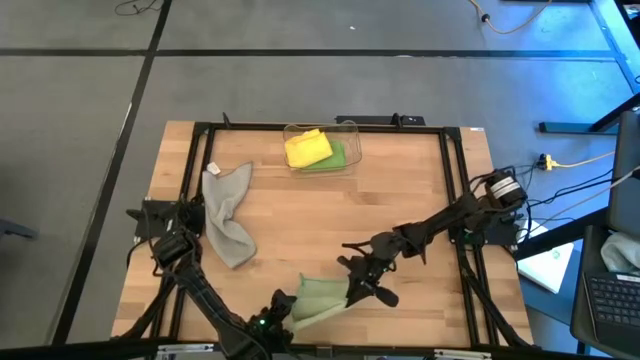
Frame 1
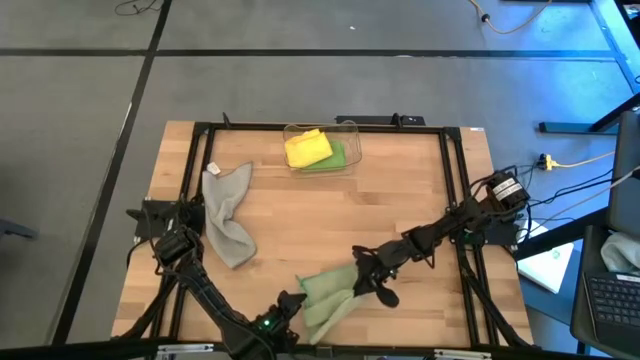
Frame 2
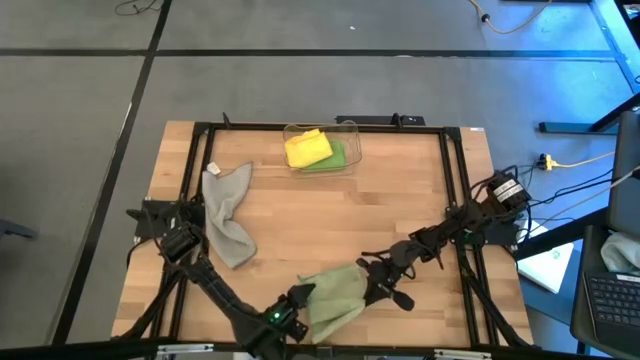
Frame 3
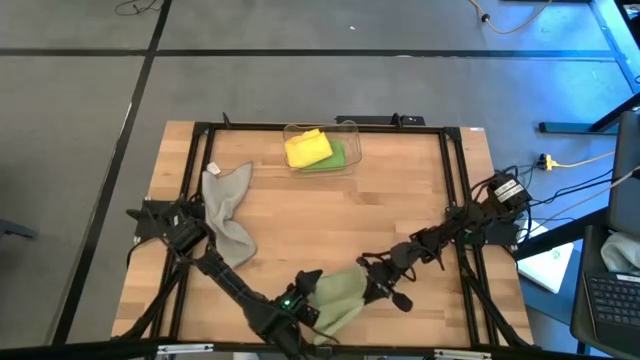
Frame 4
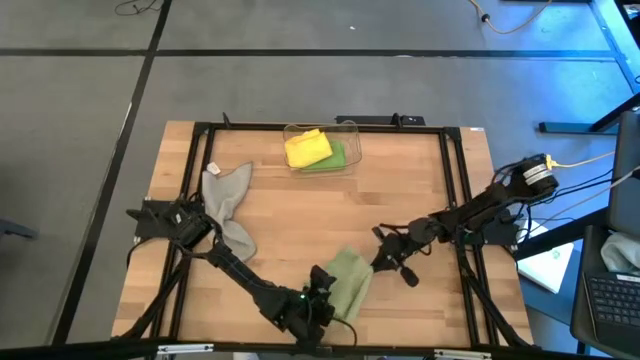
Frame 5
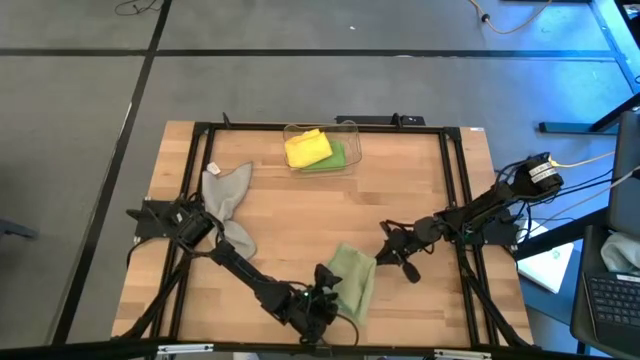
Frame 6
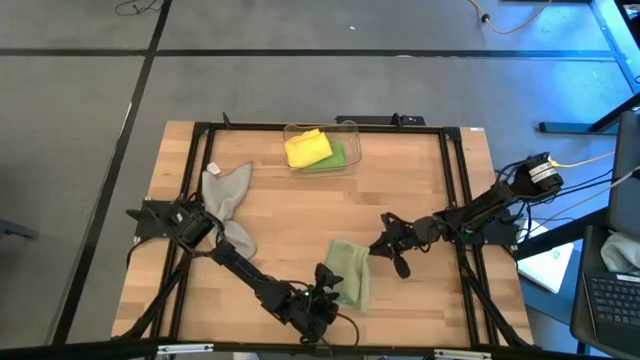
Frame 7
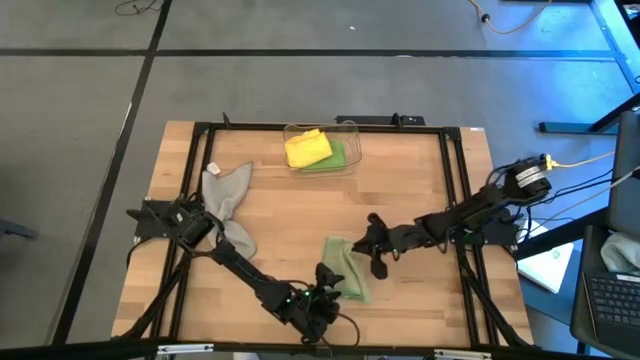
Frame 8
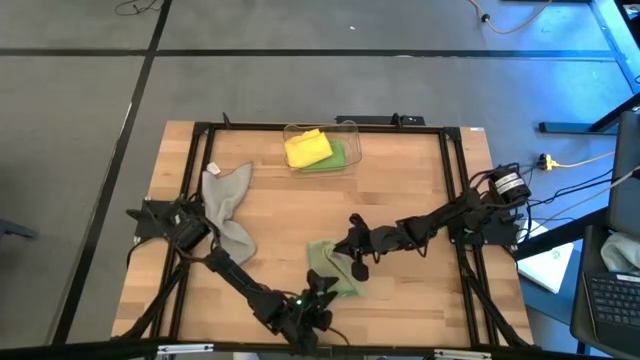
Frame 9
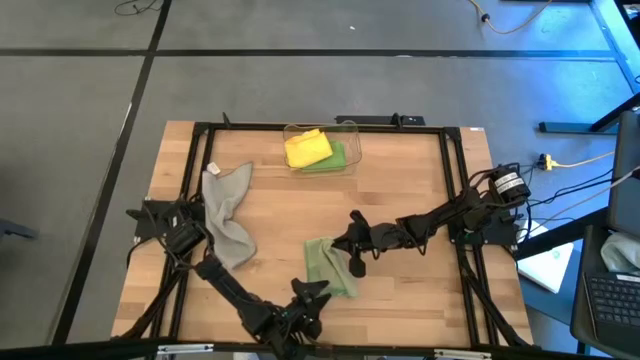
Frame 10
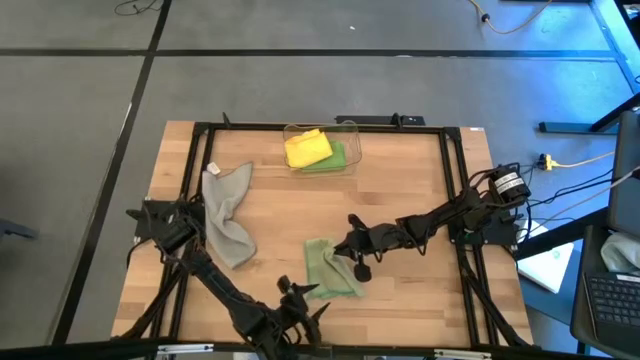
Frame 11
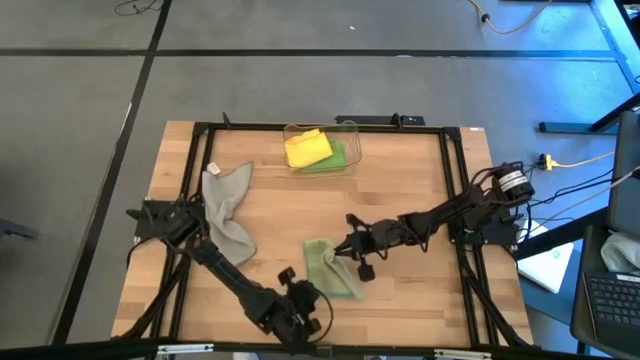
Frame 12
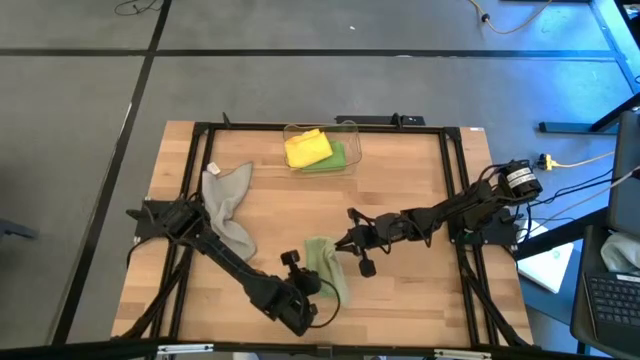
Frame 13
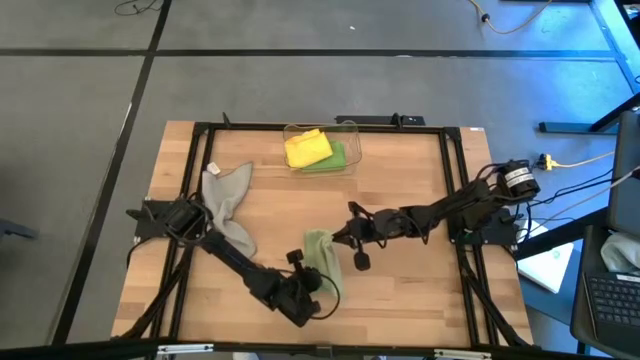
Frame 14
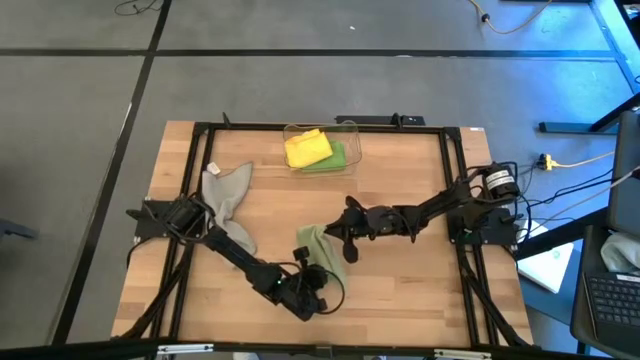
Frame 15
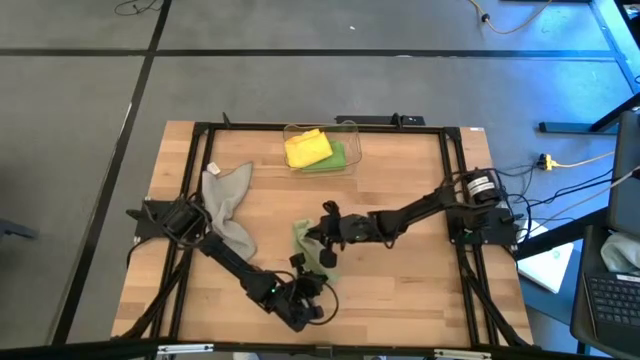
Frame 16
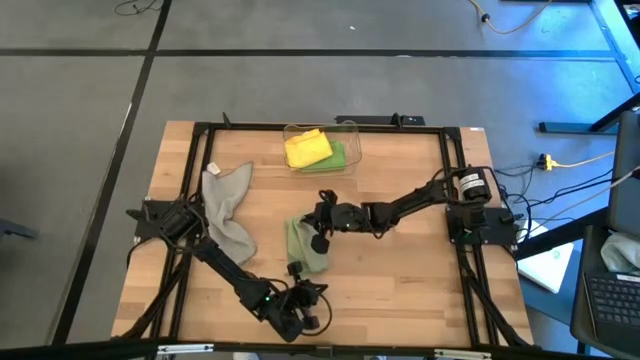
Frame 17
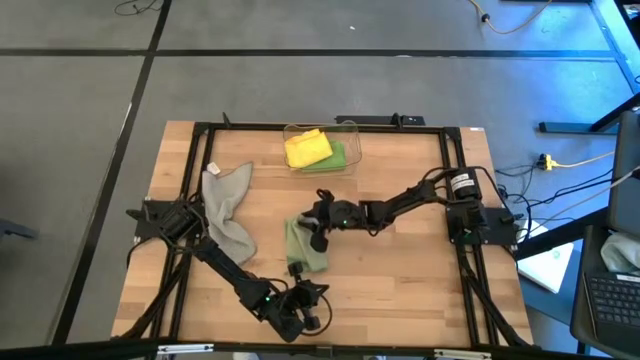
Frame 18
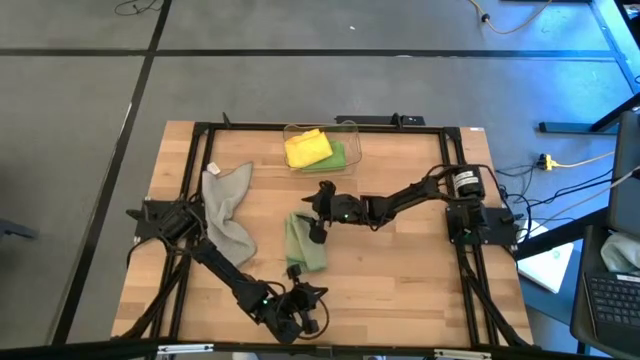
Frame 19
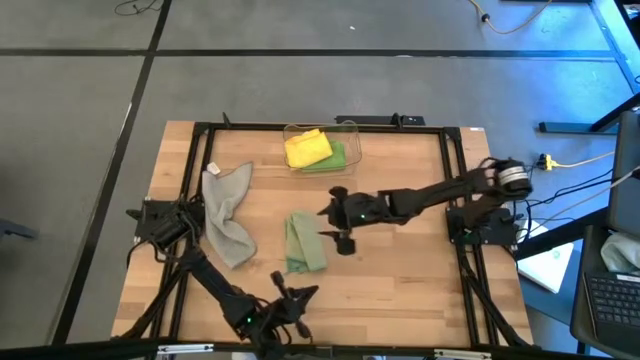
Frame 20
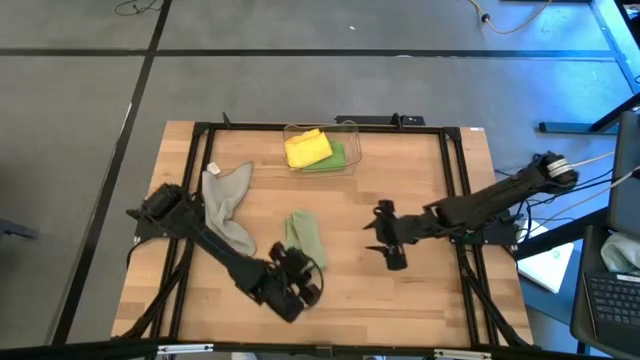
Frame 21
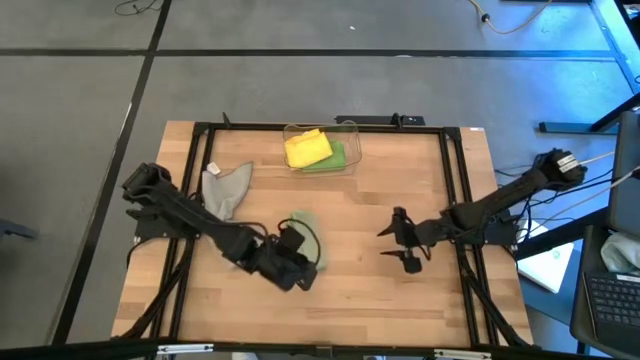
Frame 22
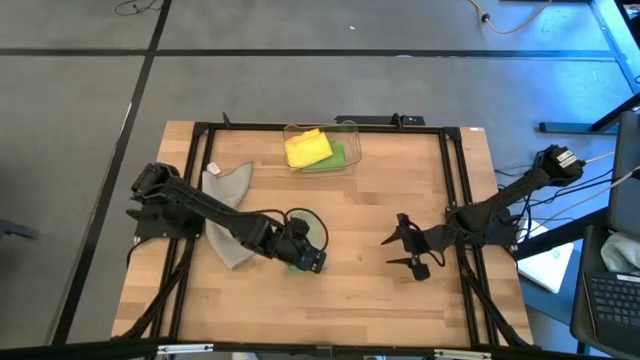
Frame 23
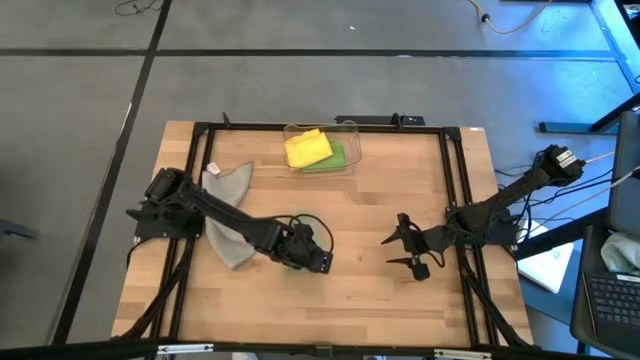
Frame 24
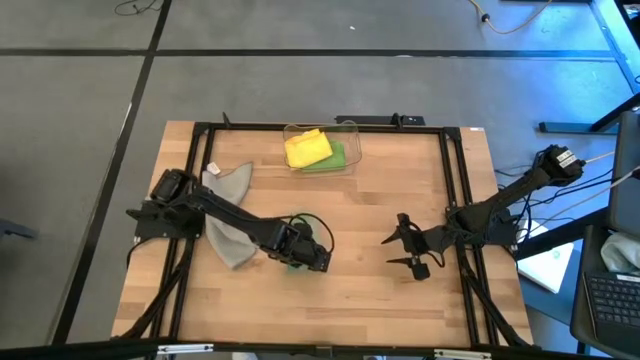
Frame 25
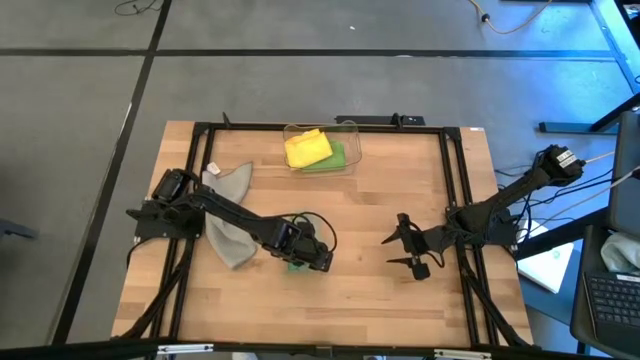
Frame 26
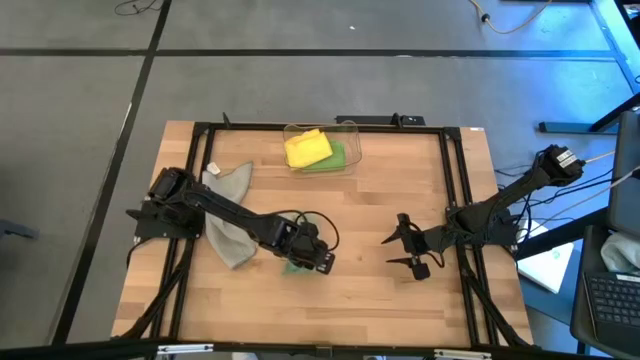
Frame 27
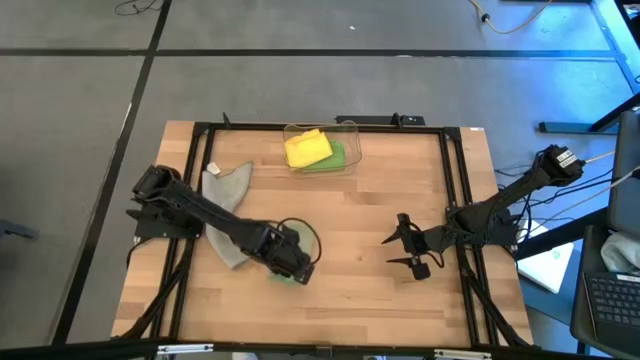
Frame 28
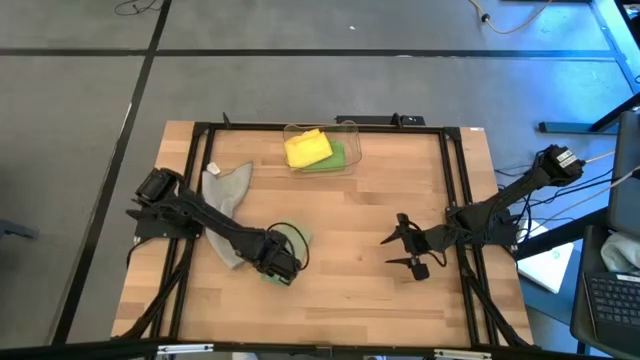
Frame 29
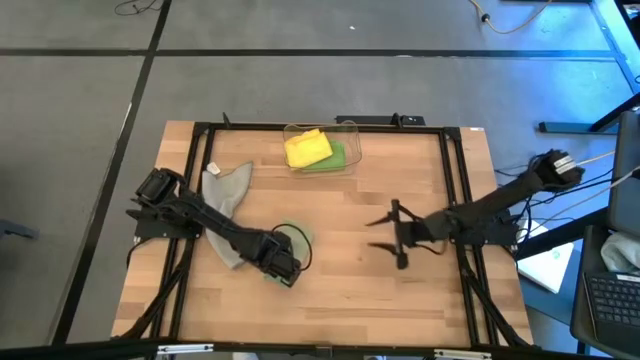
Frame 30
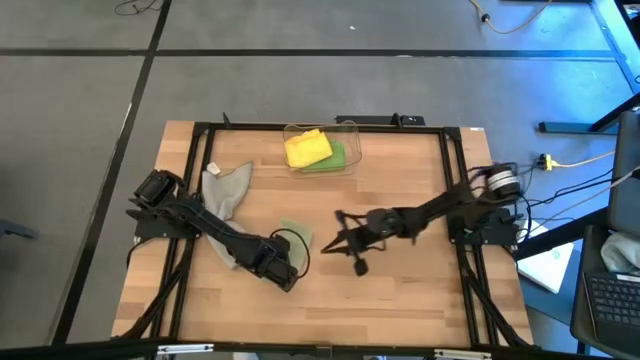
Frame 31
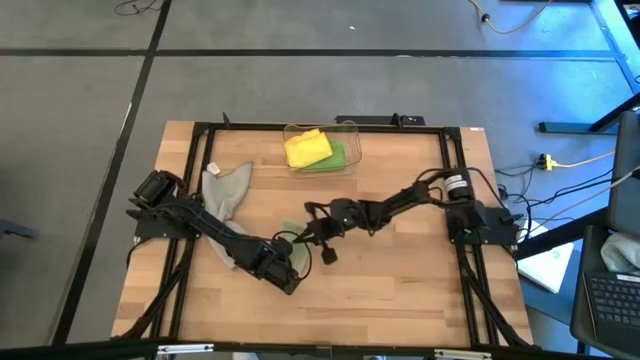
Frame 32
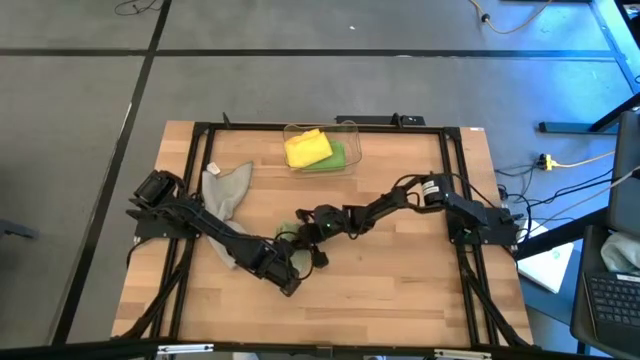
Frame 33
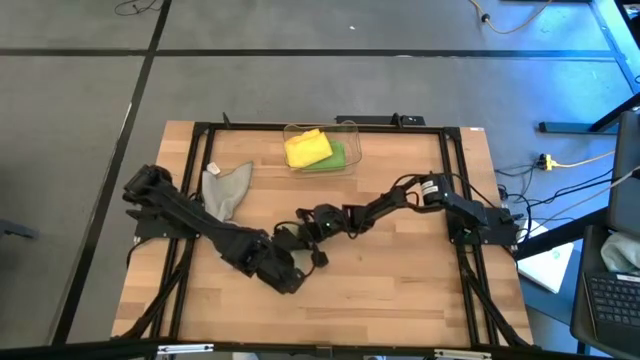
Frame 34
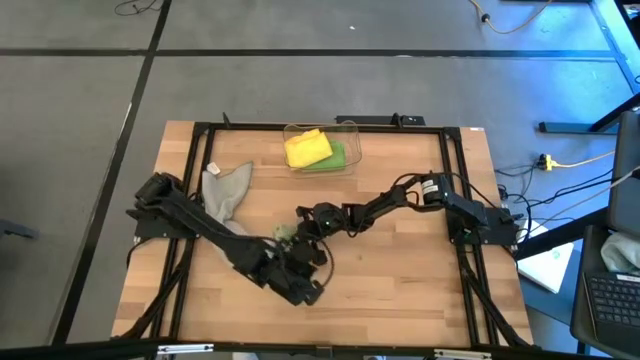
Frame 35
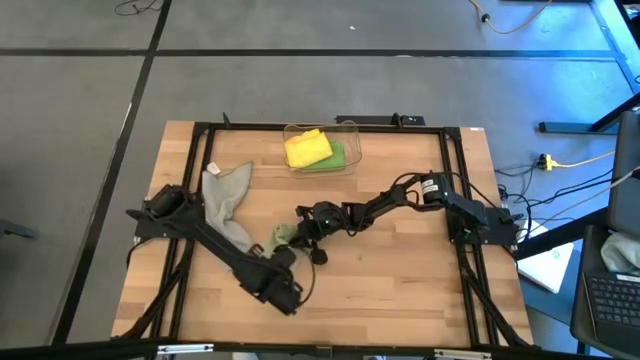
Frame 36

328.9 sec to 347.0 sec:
Task: Fold microfiber towels
Fold the light green microfiber cloth

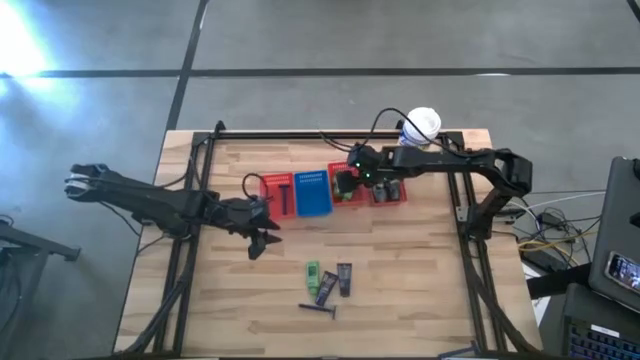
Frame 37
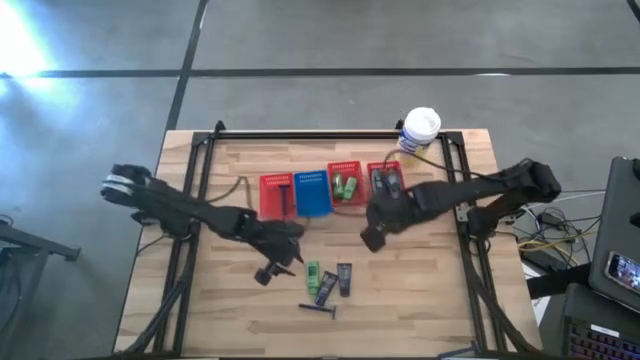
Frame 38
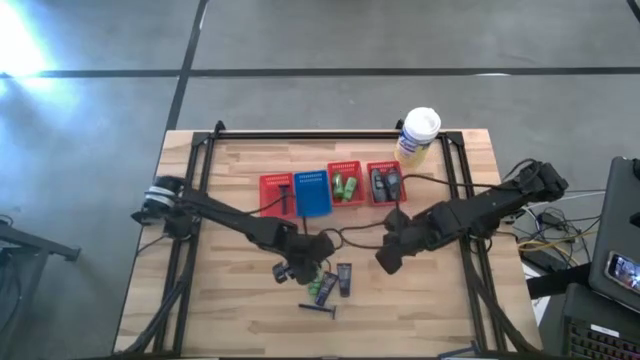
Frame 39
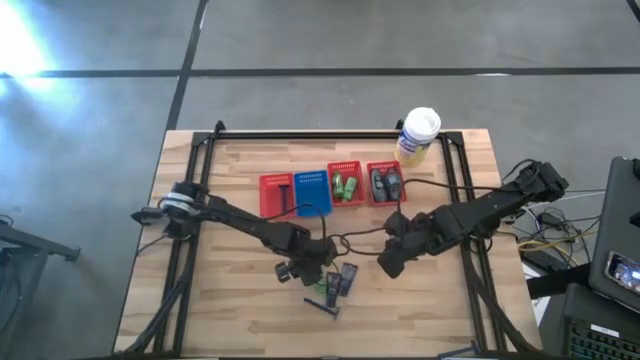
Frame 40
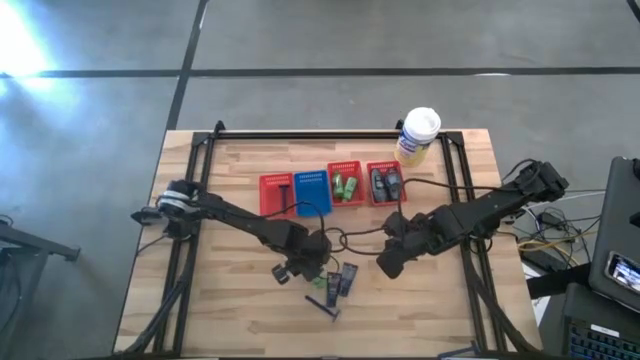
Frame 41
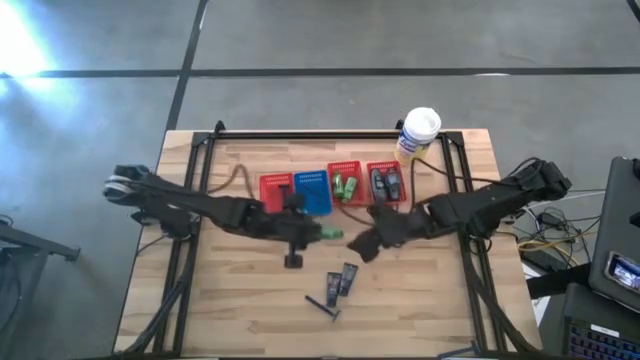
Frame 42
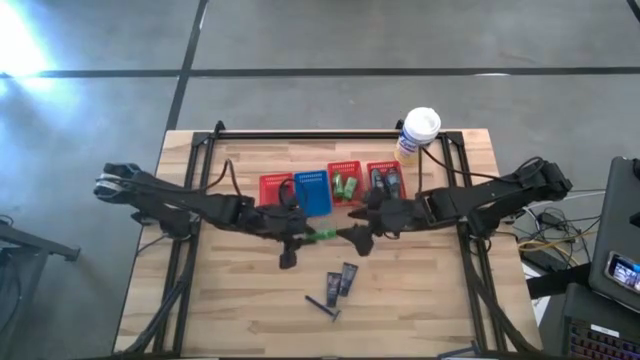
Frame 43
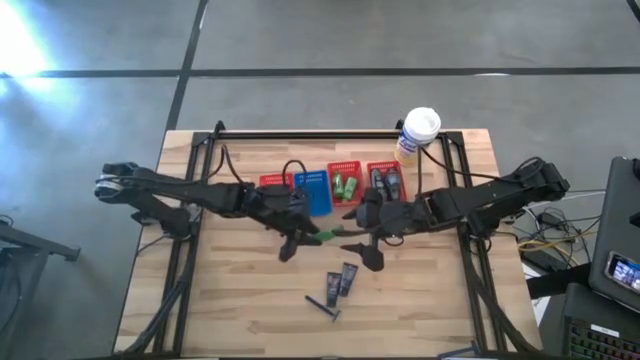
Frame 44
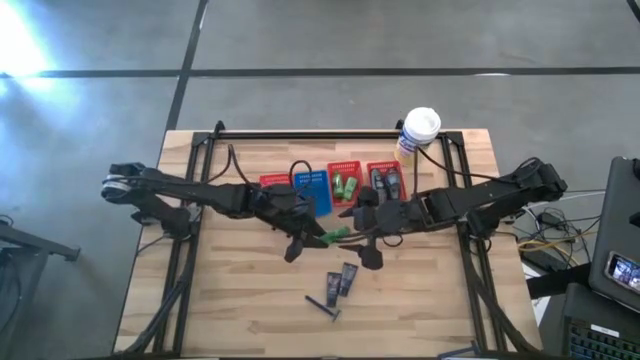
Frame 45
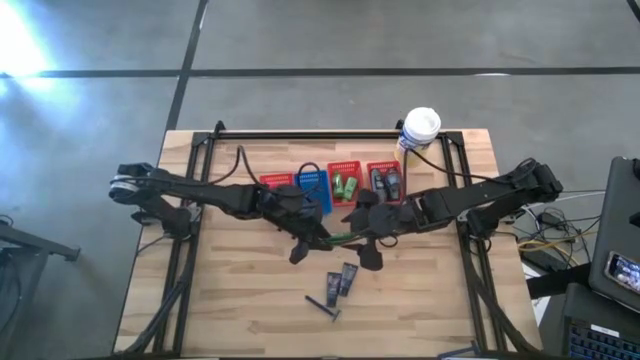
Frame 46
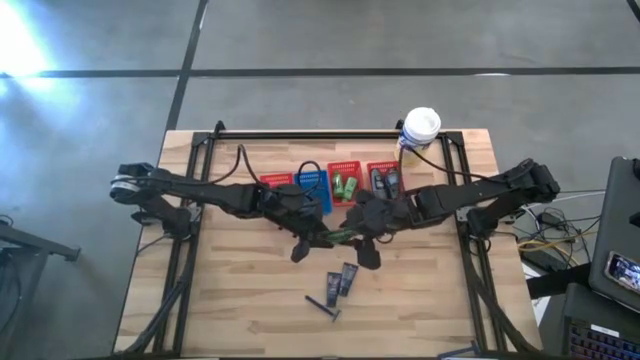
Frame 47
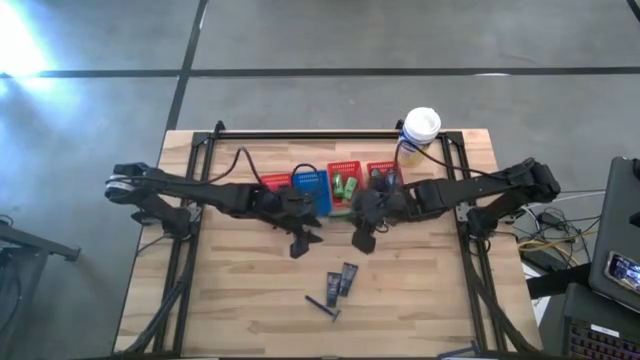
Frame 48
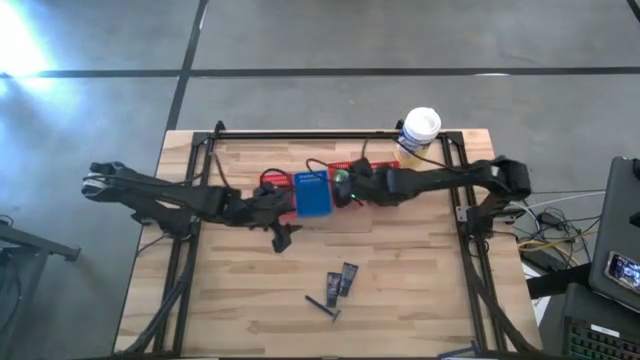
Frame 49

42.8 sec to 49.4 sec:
Task: Pick & Place Travel size toiletries
Put the green shampoo into the middle red bin
